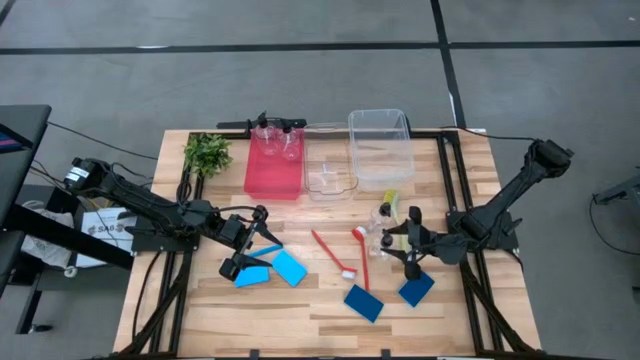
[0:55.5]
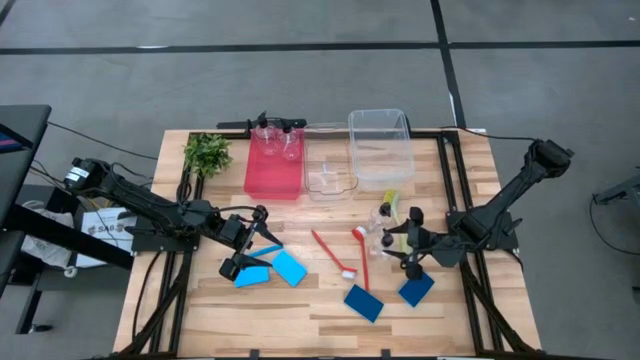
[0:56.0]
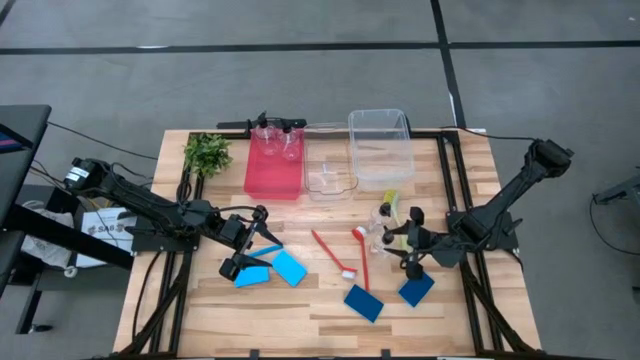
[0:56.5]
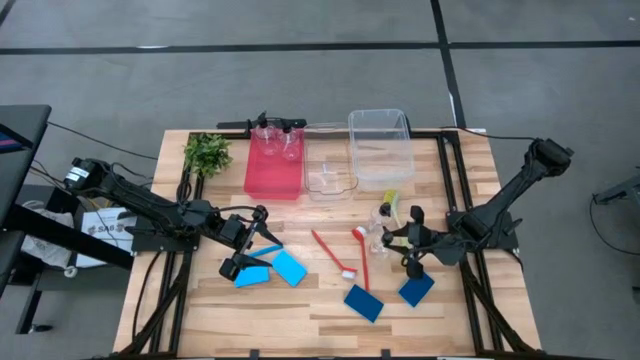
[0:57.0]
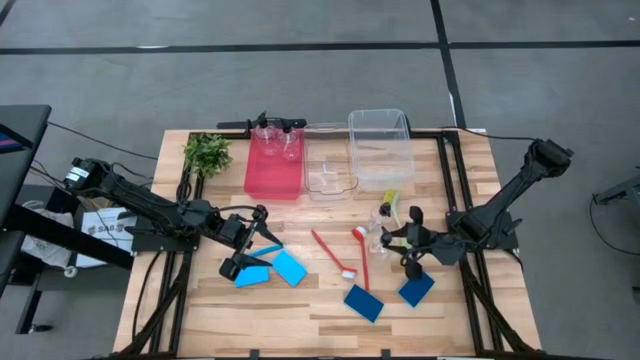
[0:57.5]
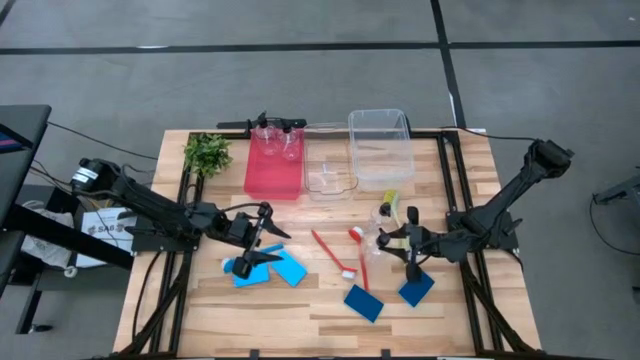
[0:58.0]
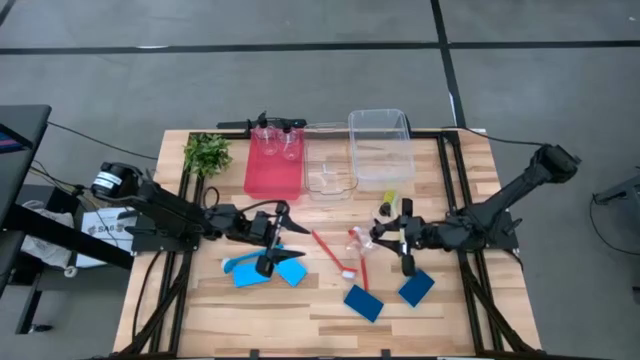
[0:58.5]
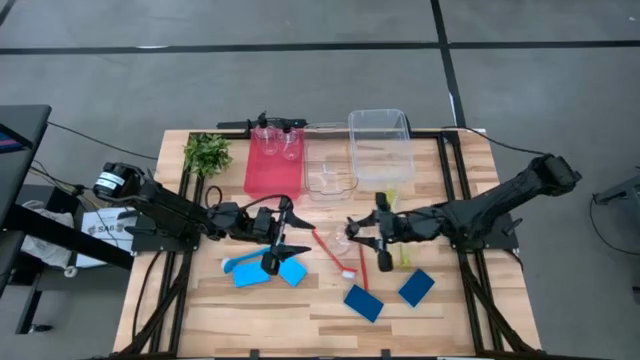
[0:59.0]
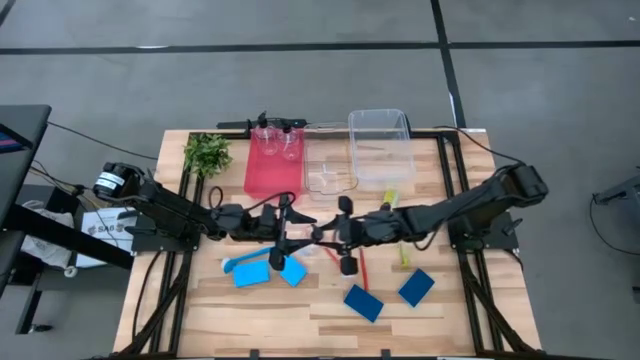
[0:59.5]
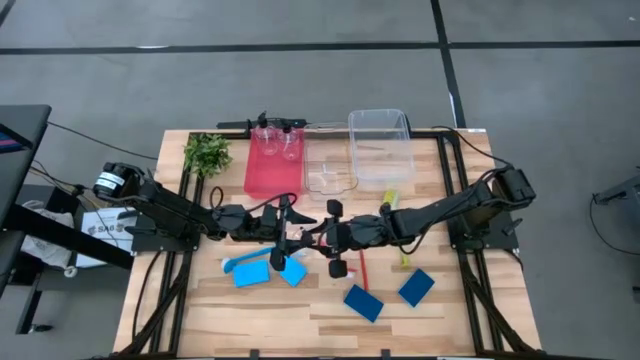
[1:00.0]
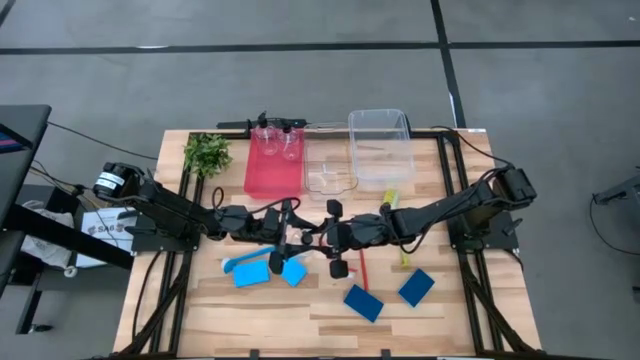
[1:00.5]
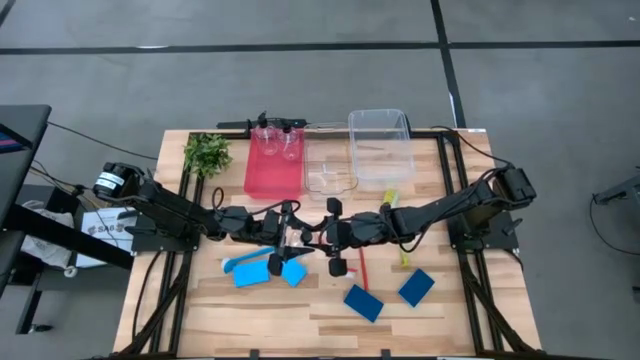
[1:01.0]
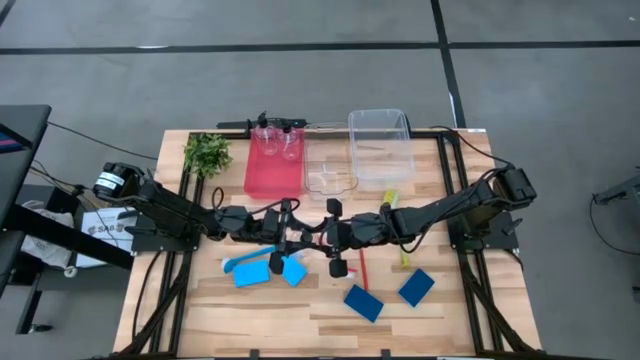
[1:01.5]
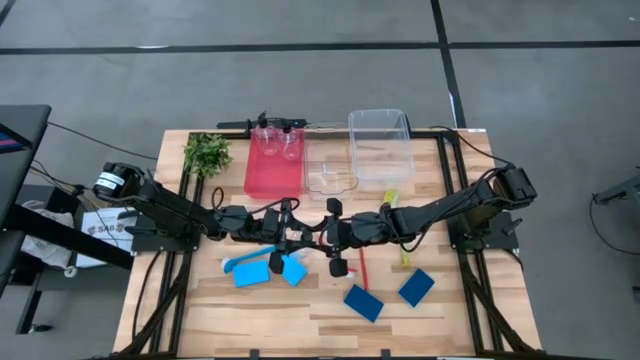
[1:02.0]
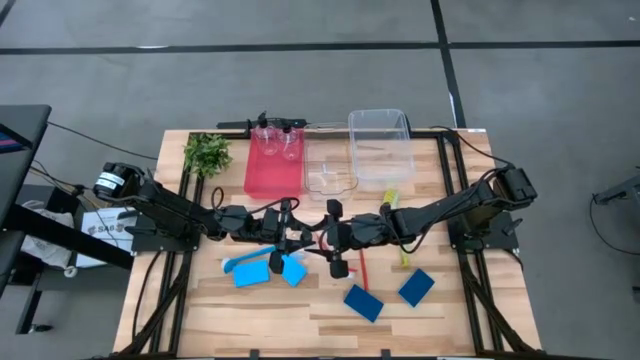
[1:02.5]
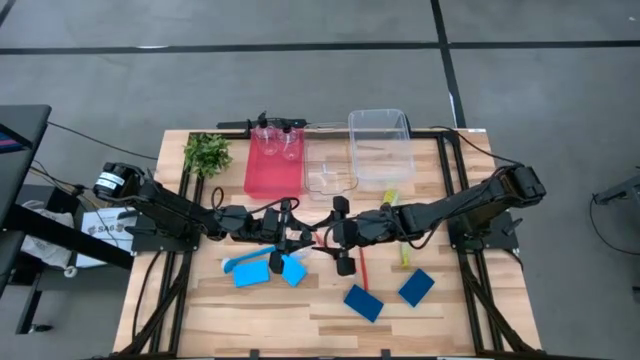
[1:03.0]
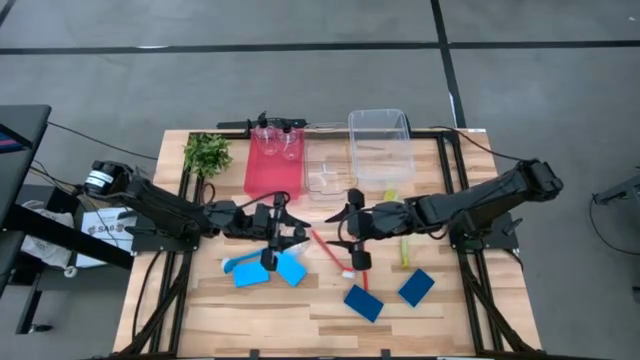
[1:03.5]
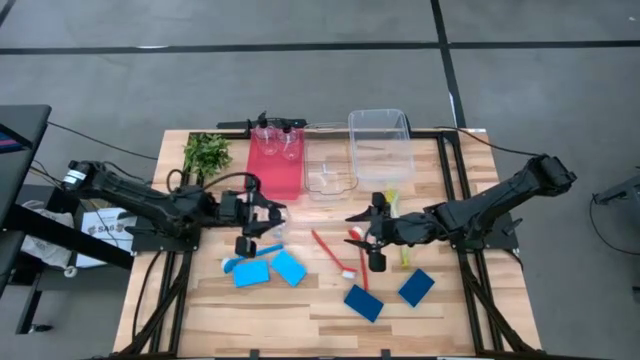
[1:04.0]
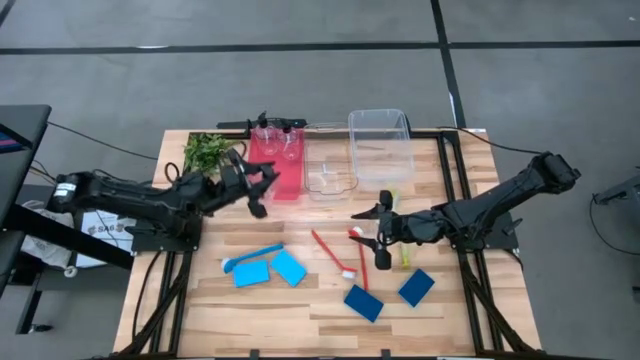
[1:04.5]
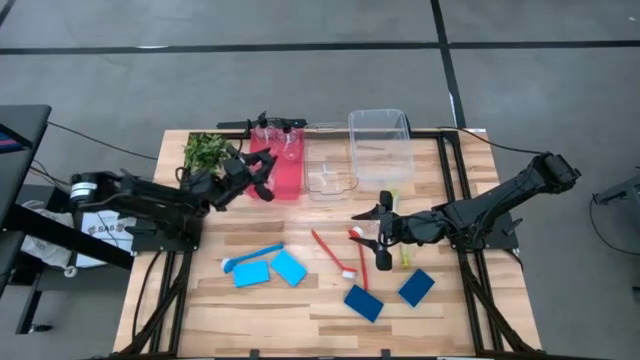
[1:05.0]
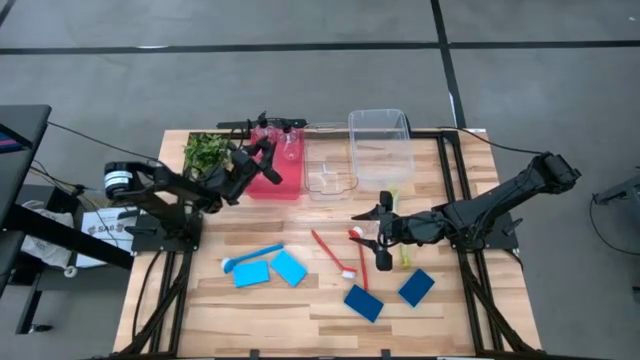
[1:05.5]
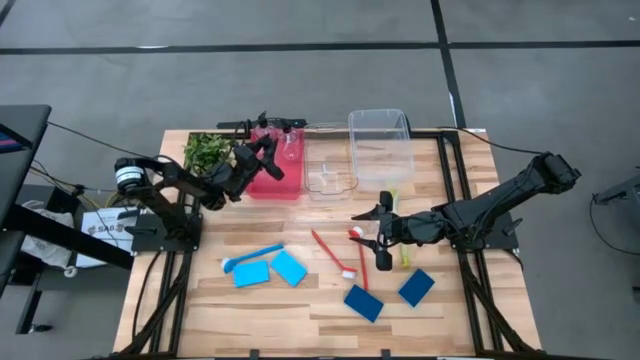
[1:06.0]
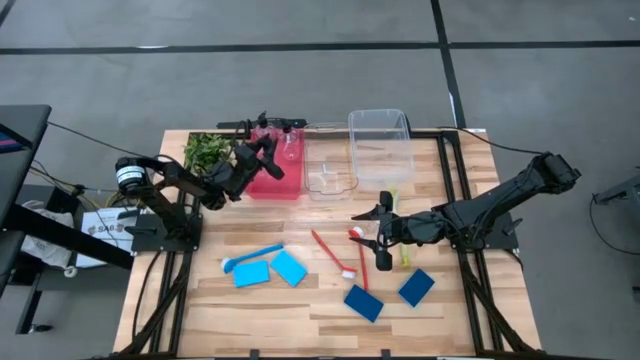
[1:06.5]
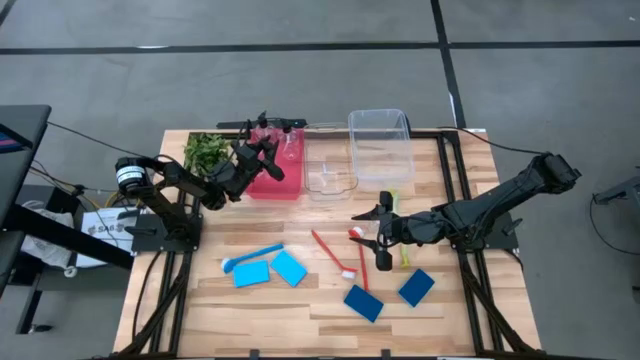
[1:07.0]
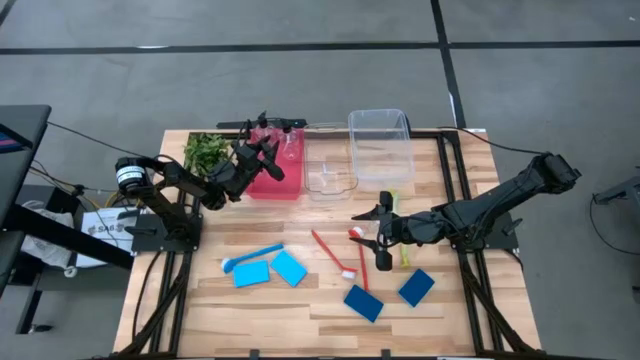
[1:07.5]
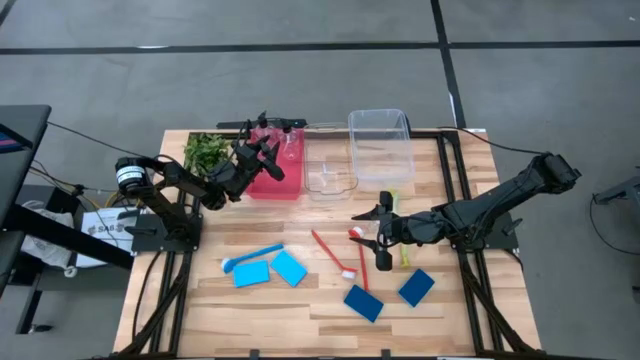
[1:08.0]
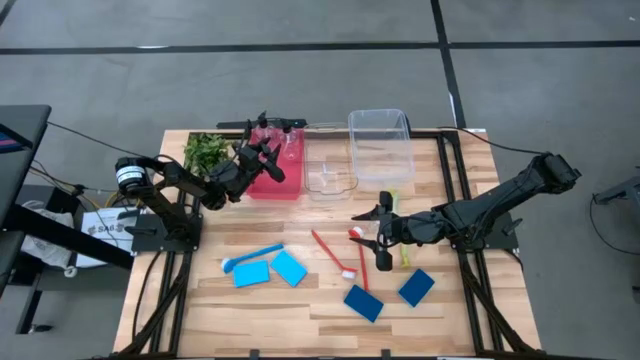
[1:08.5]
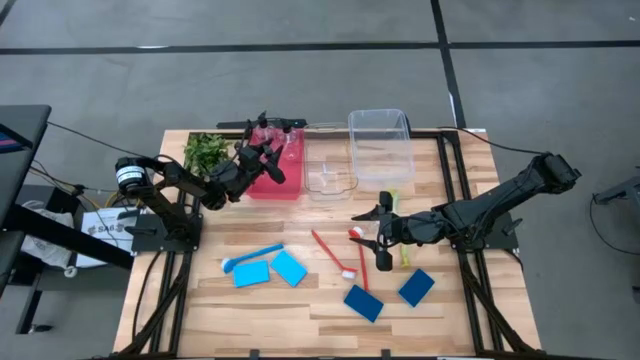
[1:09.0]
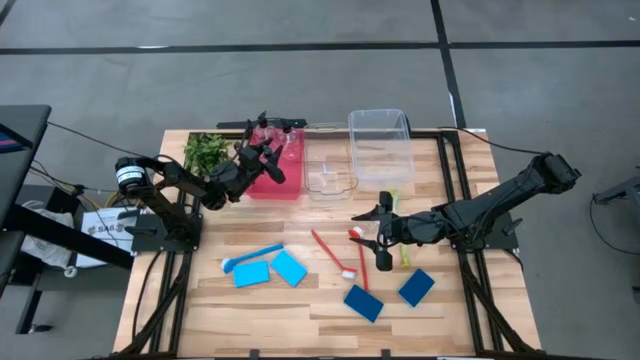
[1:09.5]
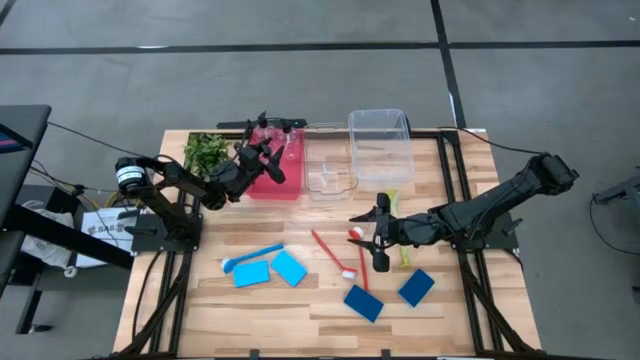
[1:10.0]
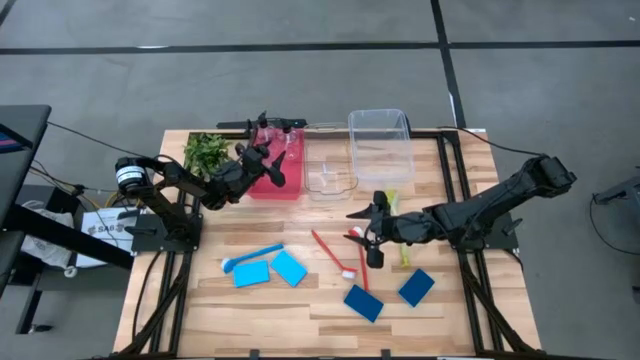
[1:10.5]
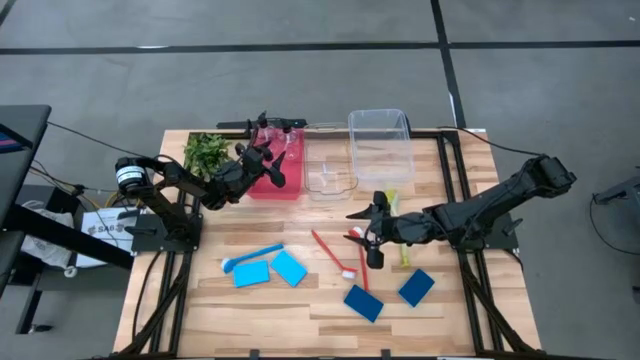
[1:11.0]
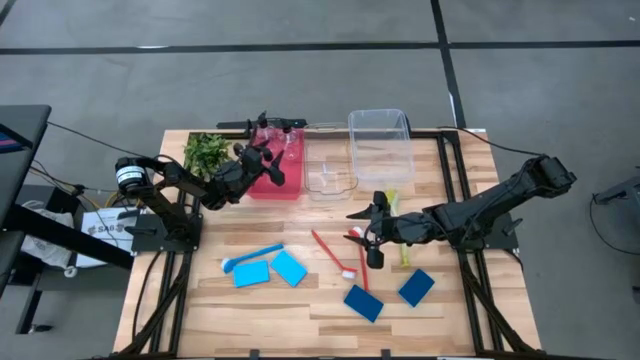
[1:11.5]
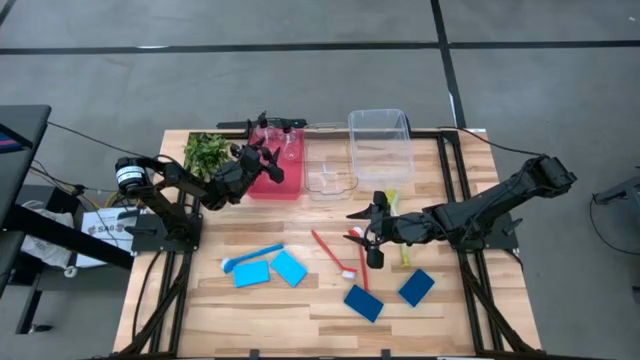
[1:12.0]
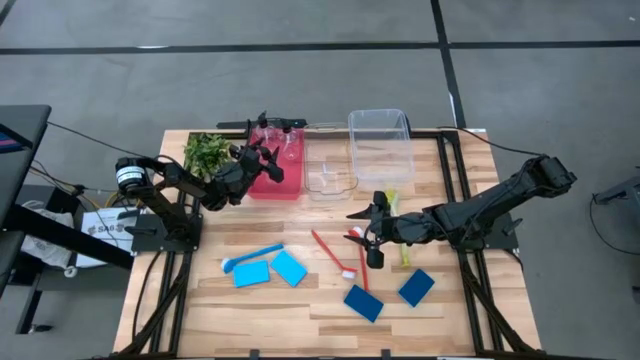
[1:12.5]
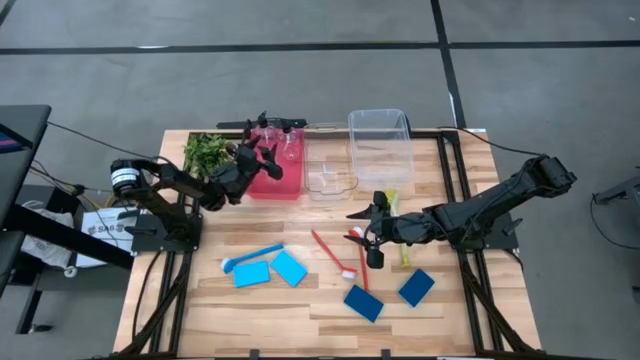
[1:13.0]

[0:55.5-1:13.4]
Task: Pick & Place Kitchen Sink Supplies
Put the bottom transparent soap dispenser into the red bin

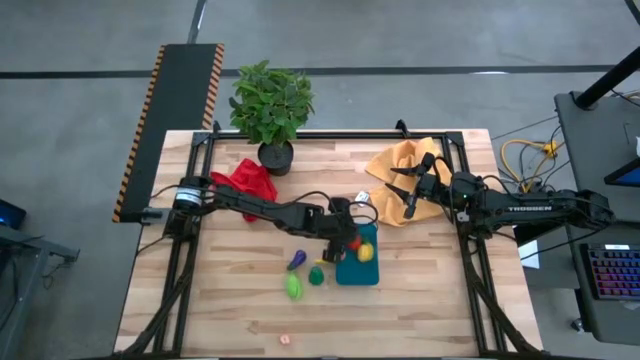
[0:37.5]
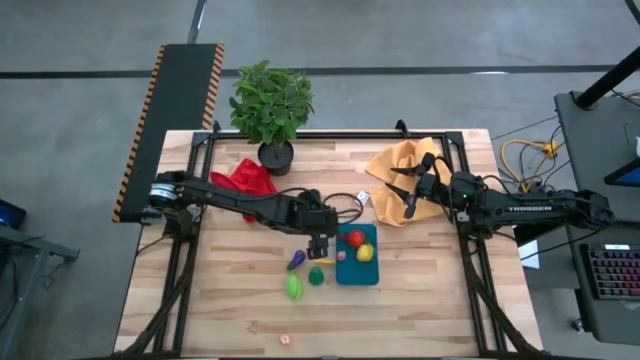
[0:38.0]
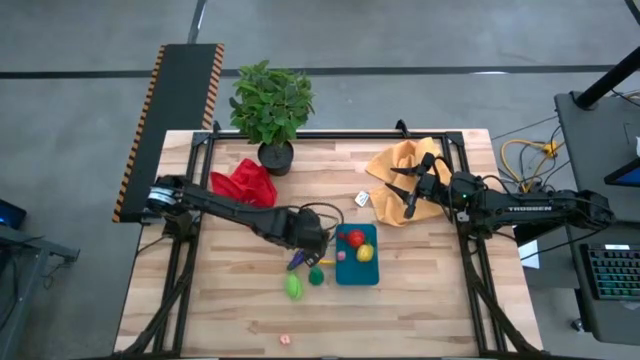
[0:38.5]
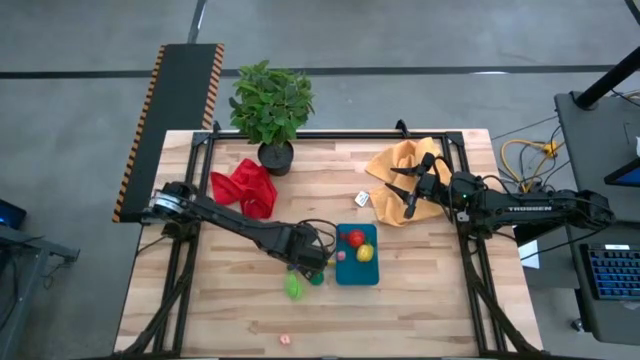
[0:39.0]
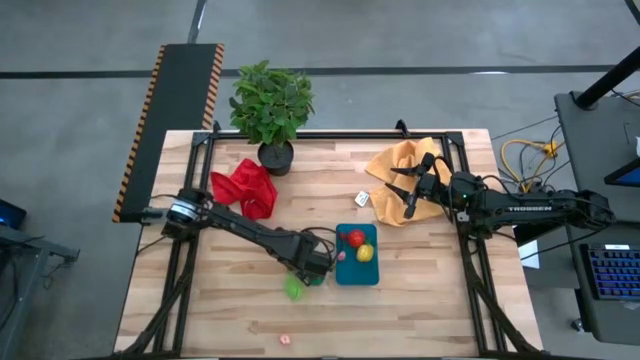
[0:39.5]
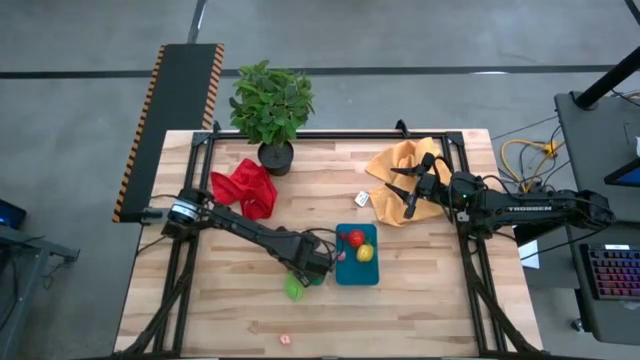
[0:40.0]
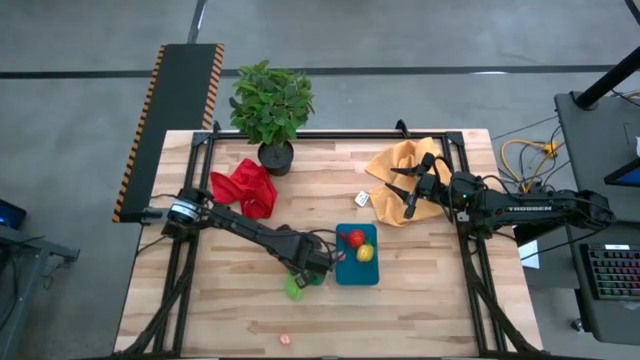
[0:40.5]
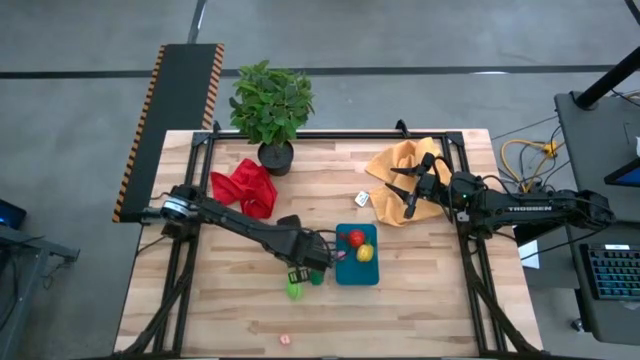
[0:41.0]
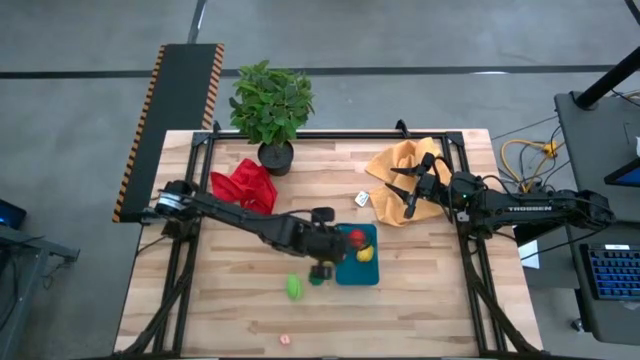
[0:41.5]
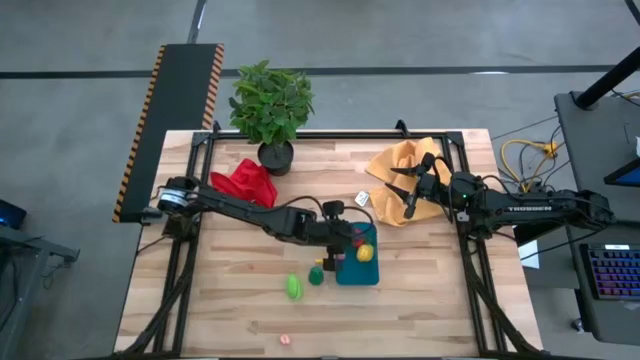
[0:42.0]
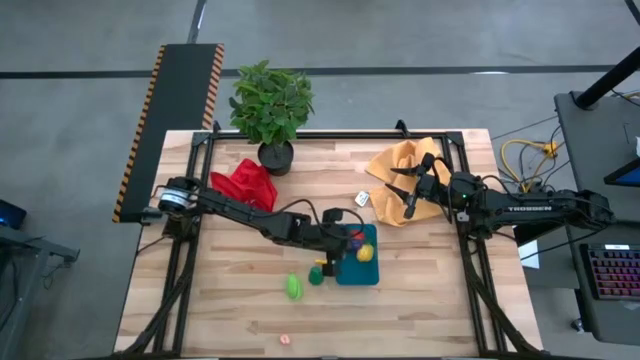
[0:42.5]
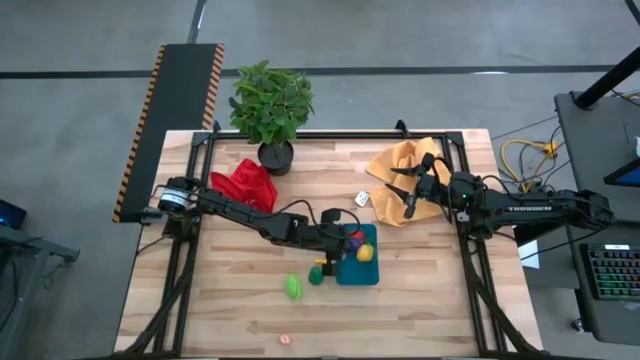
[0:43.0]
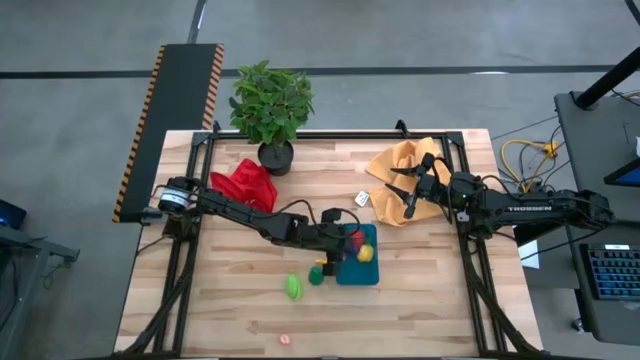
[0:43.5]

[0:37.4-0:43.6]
Task: Pick and placing Produce into tupperware
Put the violet eggplant into the blue bin
